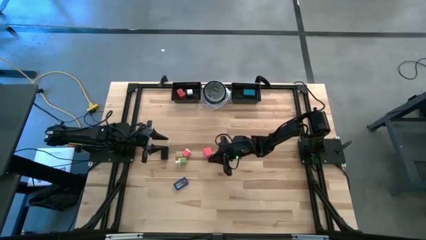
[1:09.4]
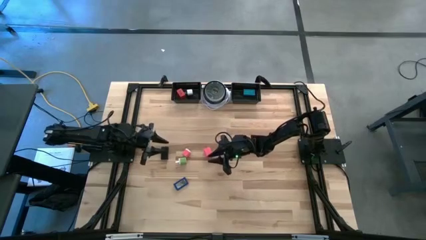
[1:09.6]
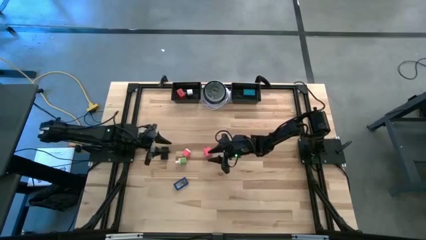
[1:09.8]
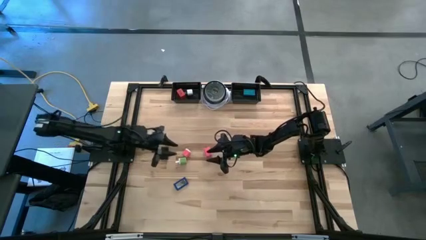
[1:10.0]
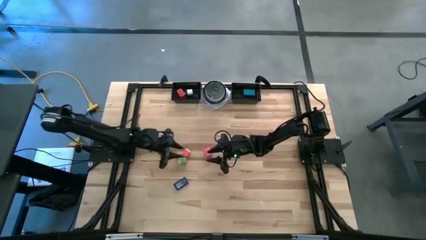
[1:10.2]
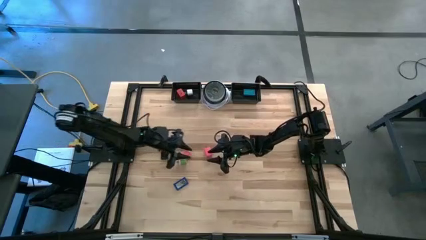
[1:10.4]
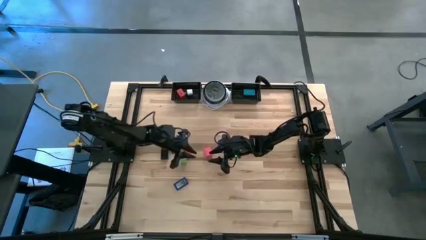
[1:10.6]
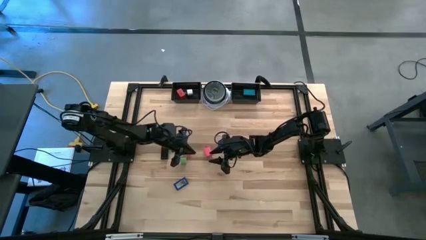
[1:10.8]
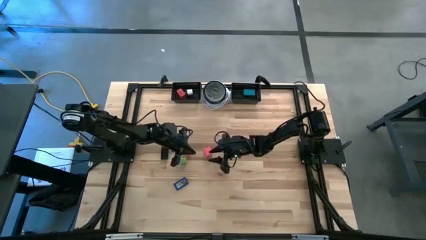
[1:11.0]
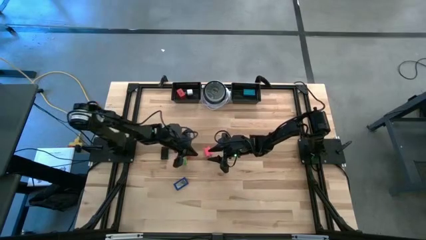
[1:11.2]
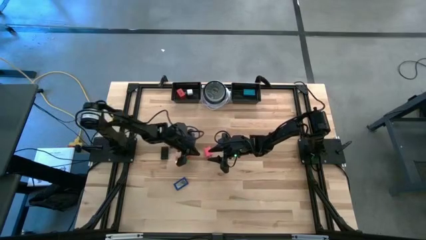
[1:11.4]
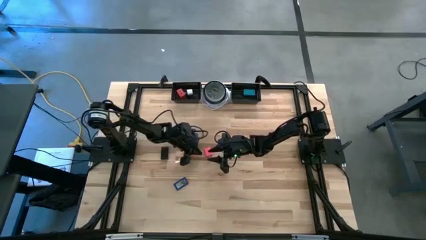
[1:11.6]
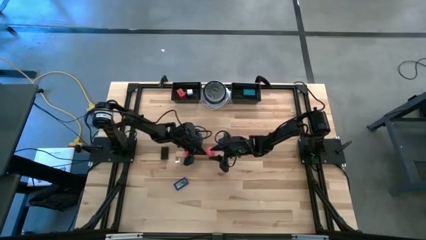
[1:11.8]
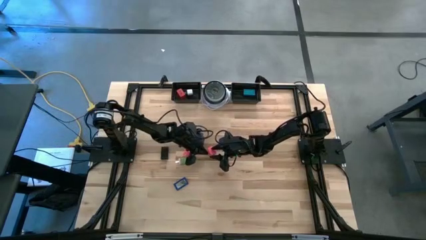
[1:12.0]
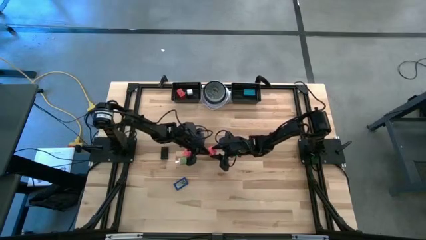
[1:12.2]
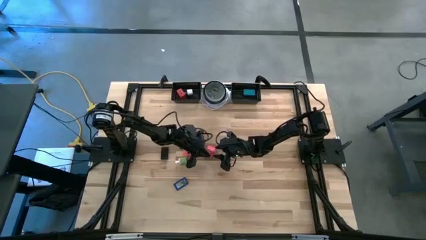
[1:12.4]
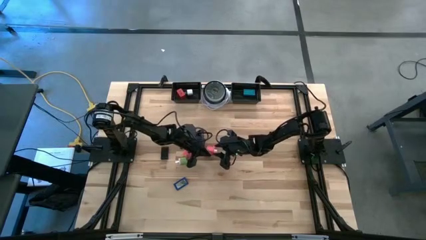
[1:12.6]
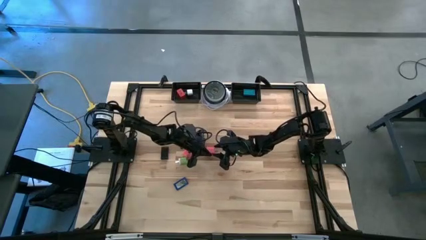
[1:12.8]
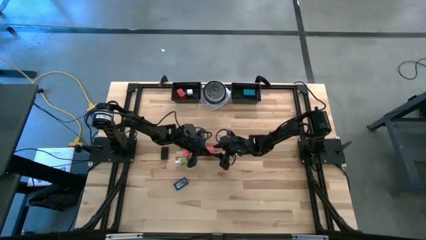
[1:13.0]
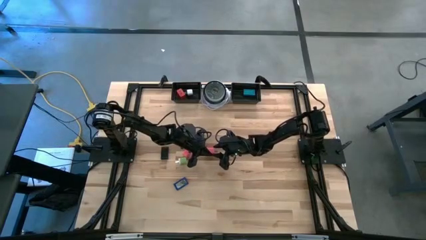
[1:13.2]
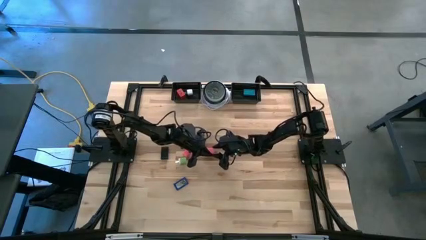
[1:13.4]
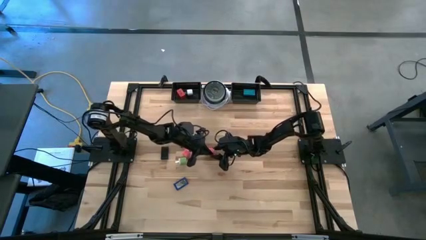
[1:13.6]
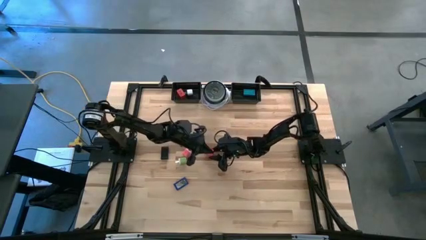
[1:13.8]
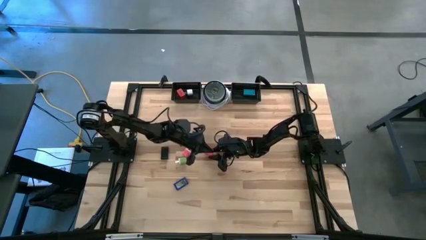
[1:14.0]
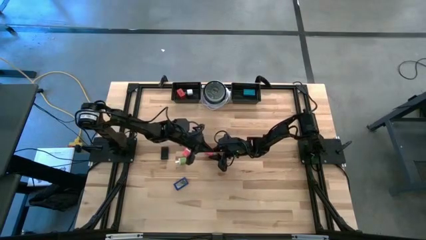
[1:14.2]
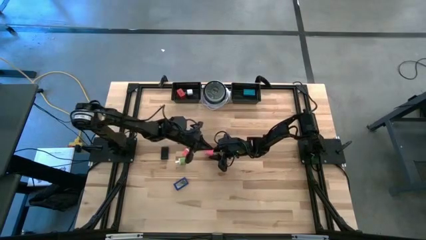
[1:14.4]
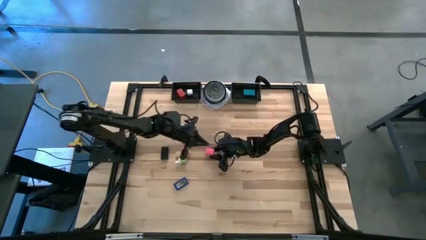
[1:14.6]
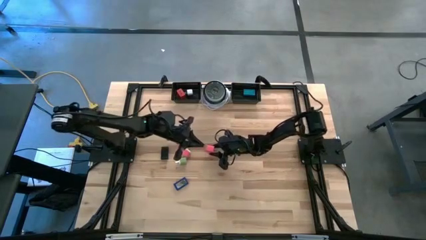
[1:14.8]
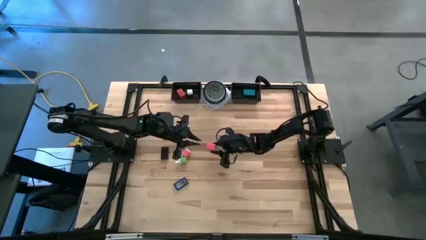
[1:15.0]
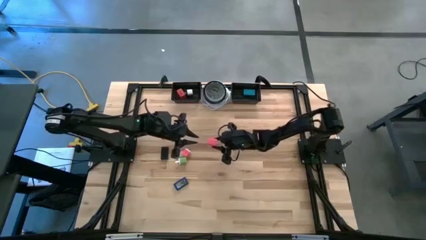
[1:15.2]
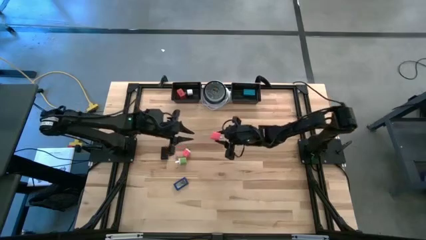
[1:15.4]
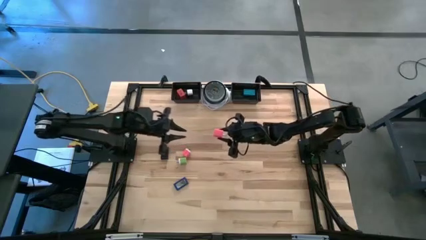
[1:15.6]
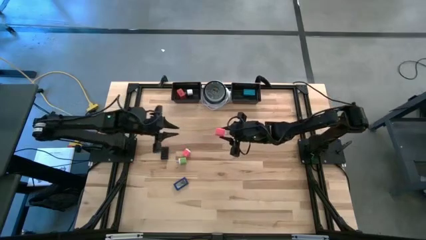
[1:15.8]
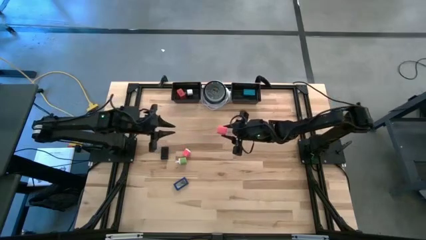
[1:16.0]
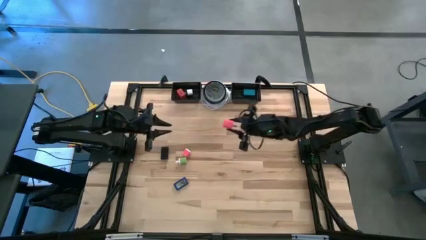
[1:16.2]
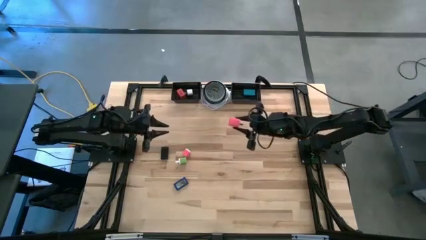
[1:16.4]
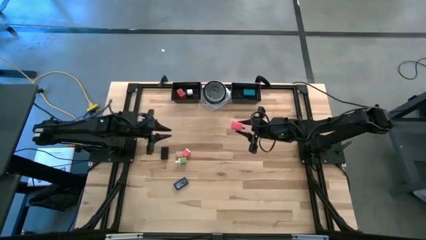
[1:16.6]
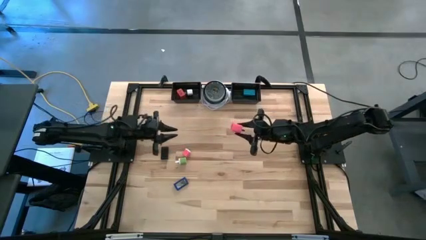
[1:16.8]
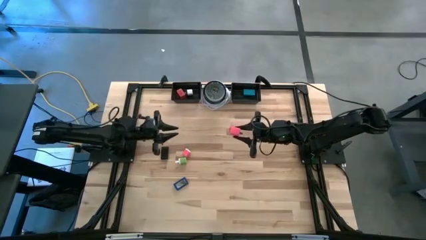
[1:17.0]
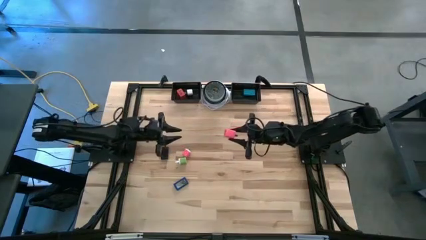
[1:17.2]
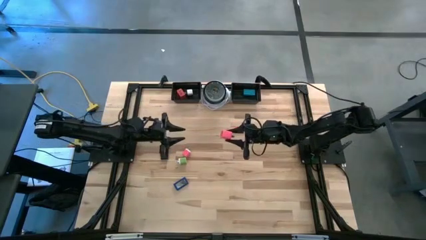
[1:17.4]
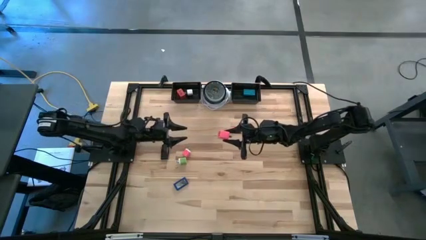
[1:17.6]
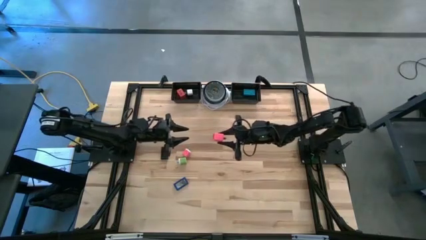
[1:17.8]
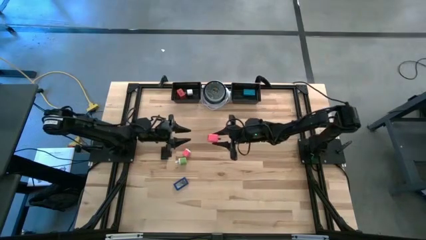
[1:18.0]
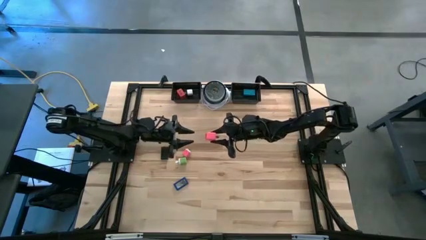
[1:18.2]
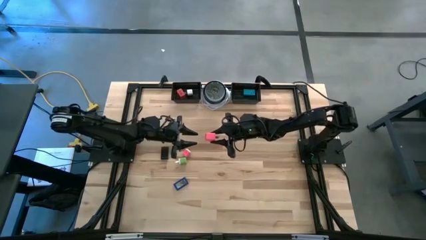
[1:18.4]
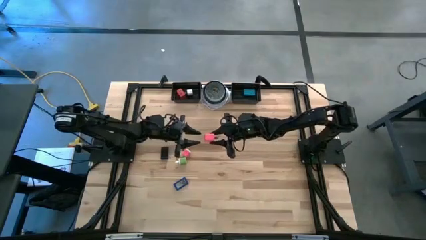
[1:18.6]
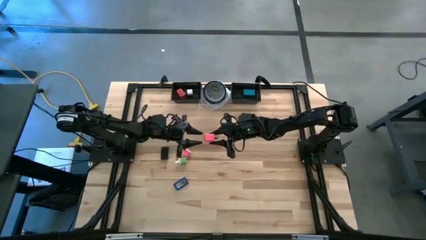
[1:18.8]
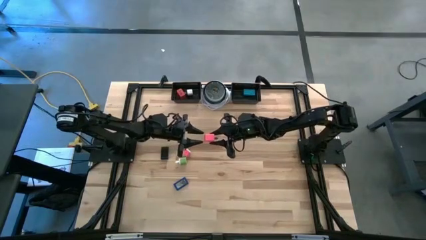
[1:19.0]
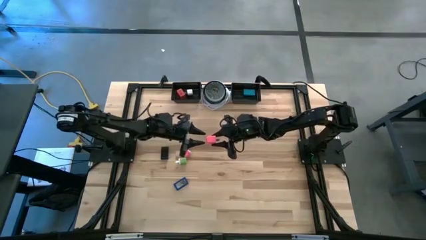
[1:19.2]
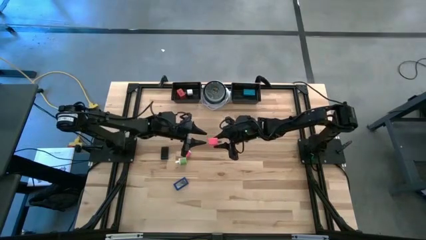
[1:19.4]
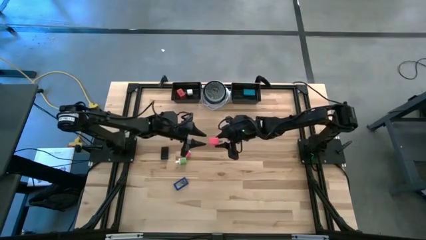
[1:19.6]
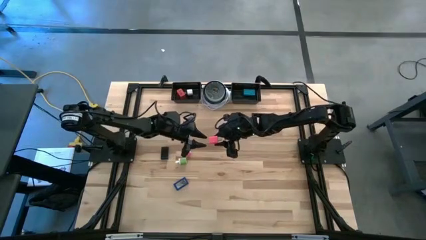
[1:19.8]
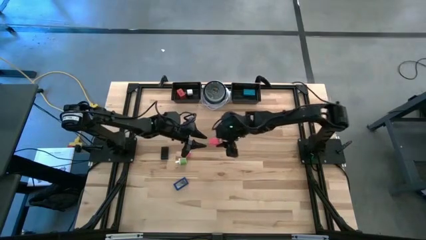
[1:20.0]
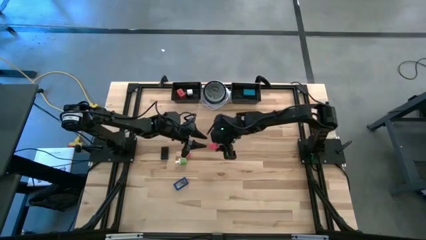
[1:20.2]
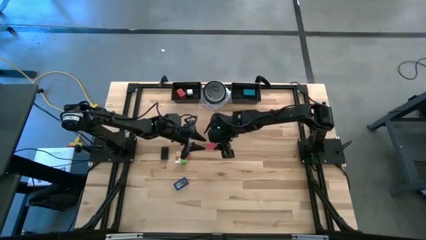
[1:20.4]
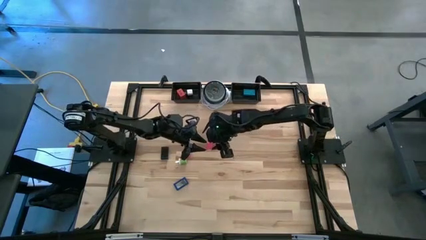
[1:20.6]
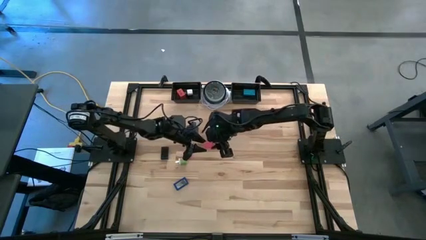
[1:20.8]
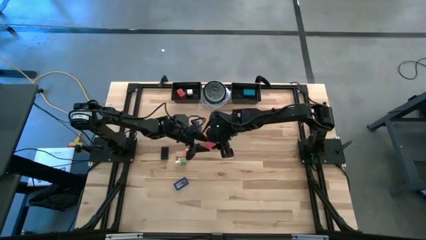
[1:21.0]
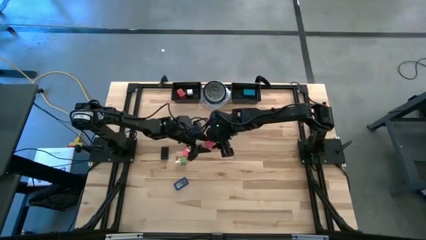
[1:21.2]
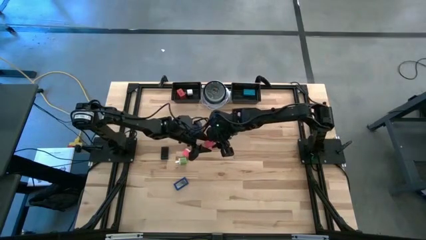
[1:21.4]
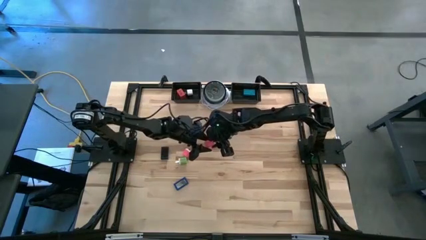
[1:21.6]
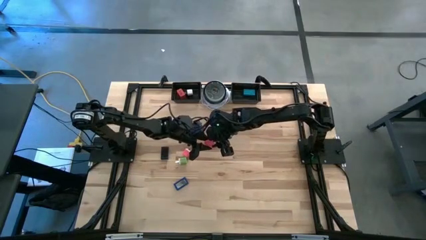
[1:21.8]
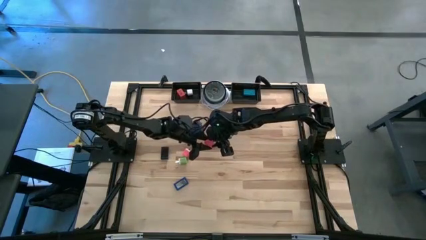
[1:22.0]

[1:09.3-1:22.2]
Task: Pick & Place Office items
Put the right pink charger adapter into the left black basket
